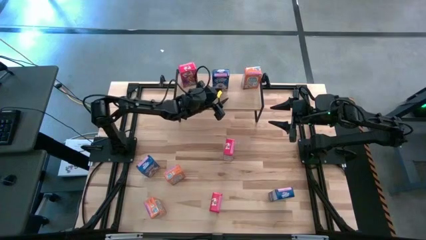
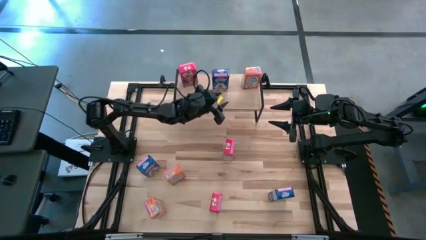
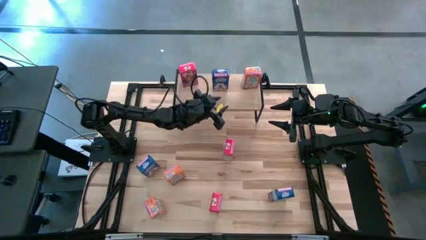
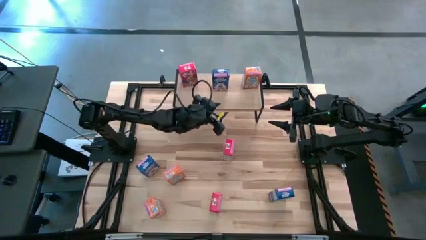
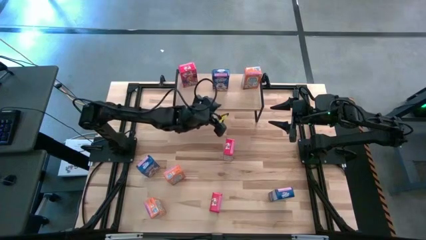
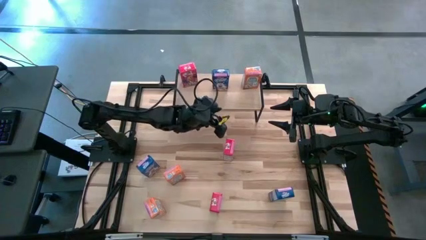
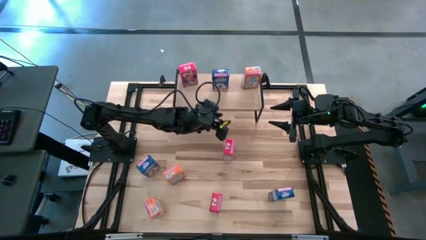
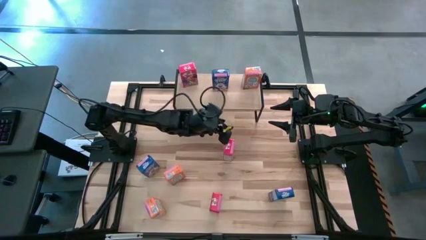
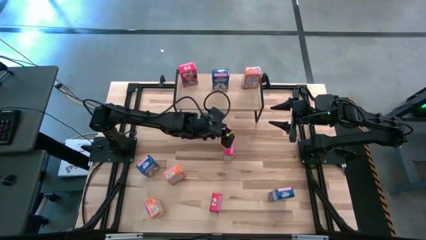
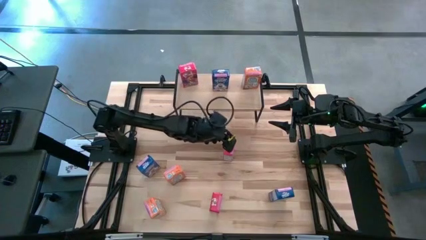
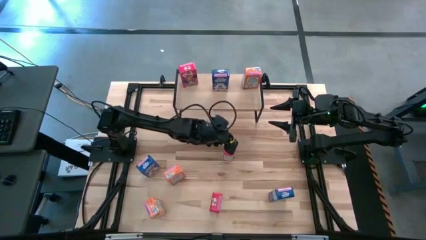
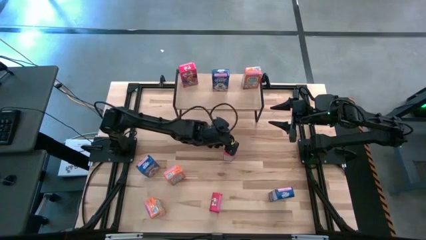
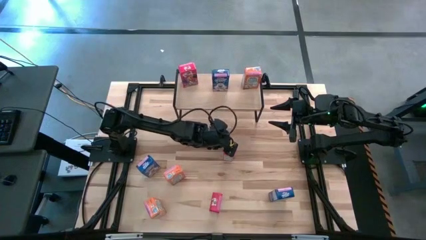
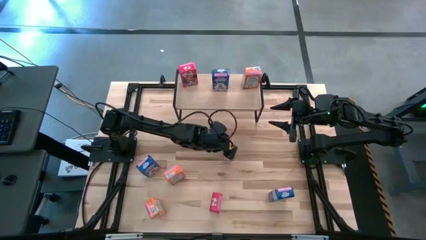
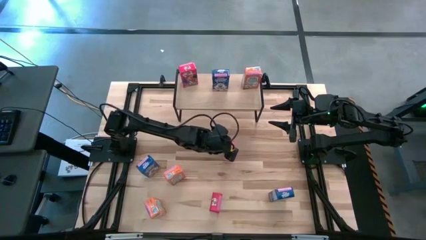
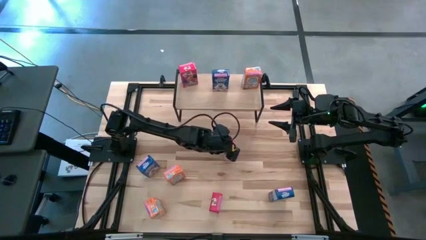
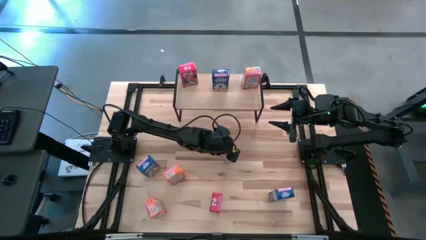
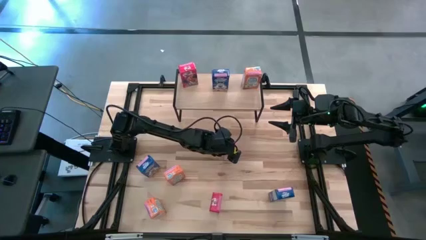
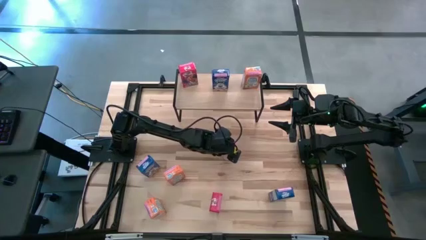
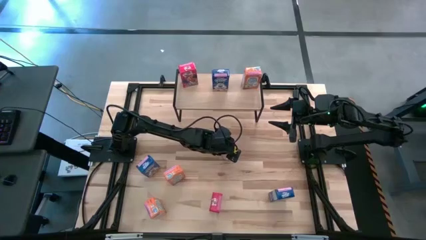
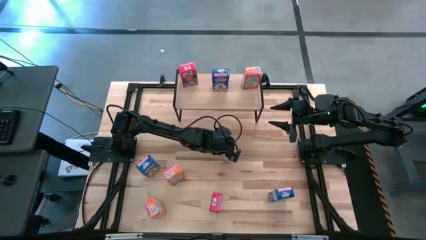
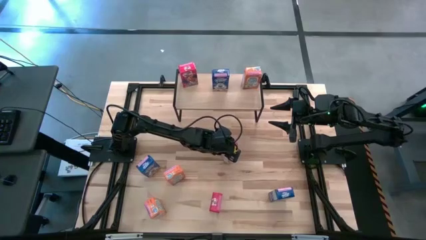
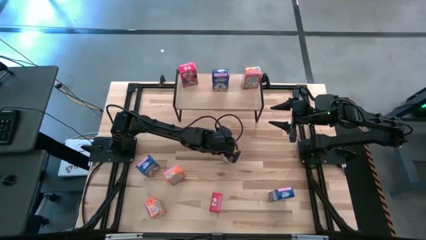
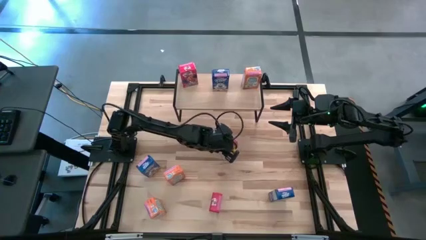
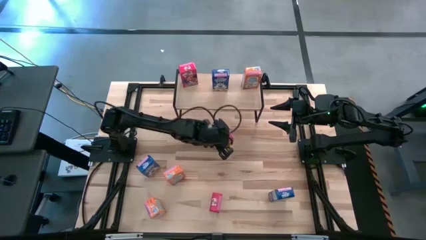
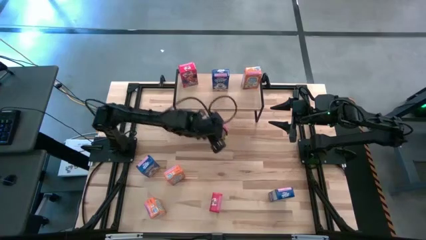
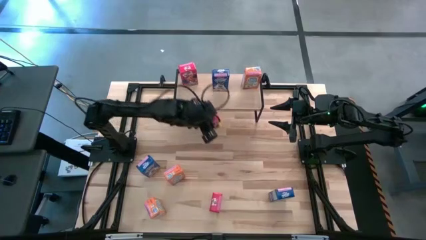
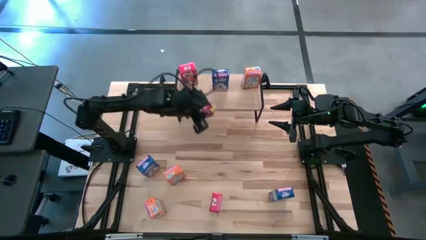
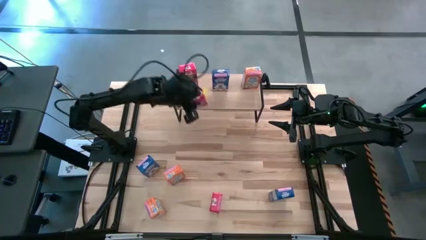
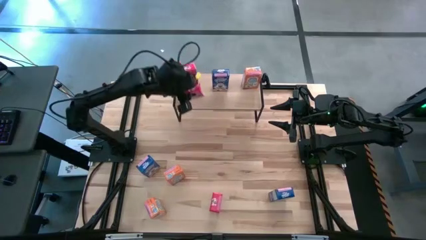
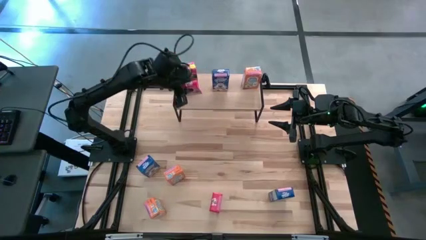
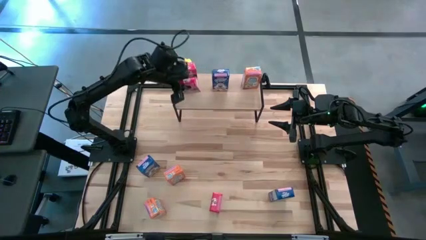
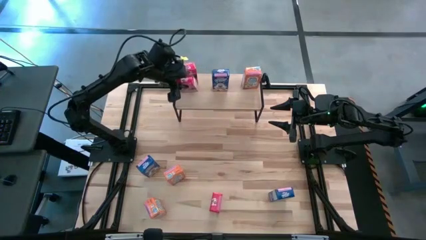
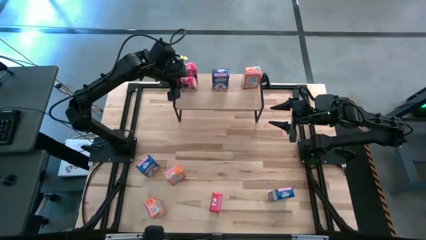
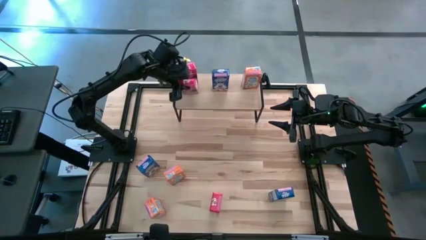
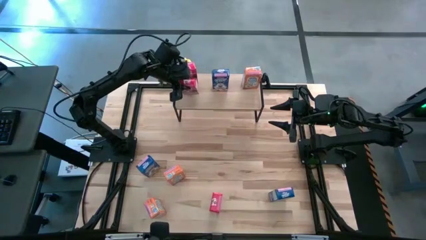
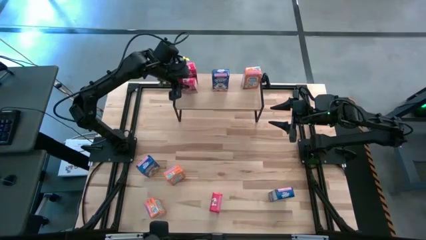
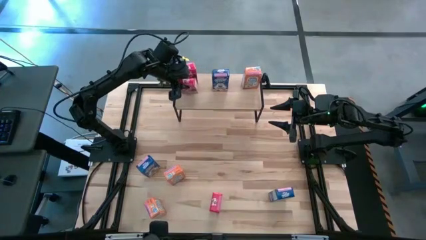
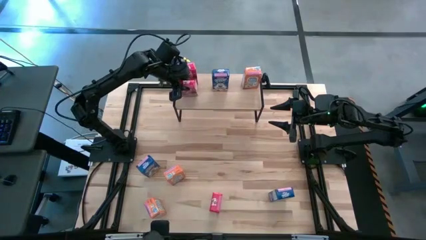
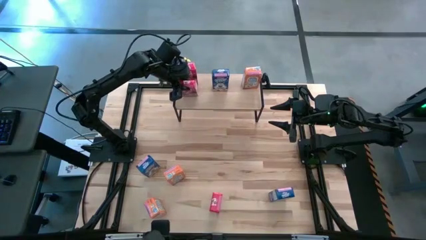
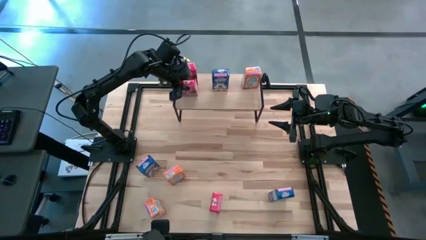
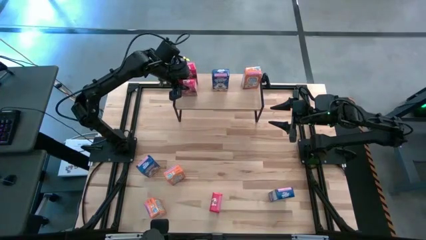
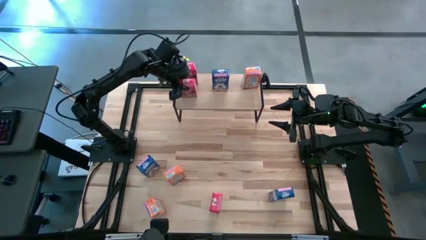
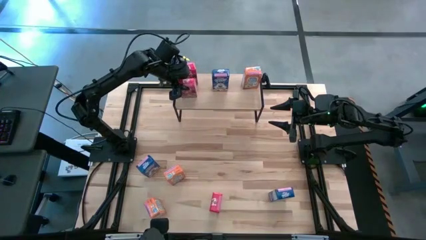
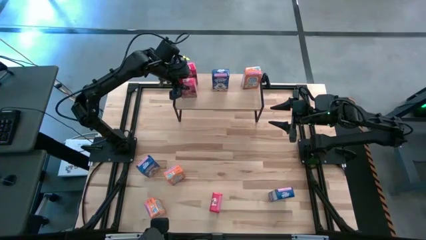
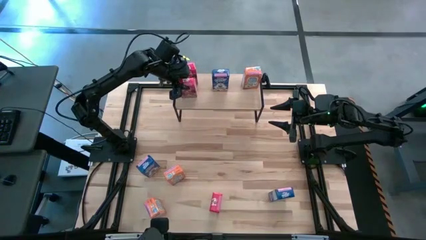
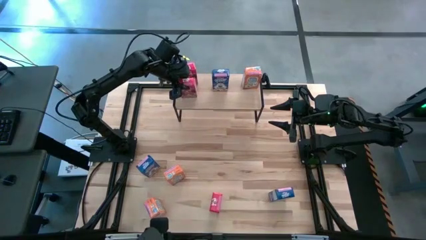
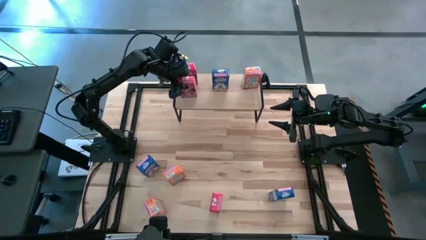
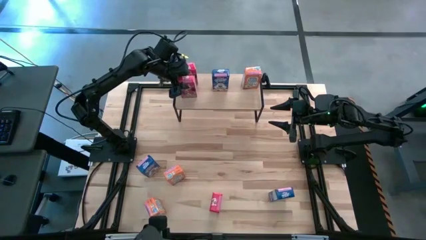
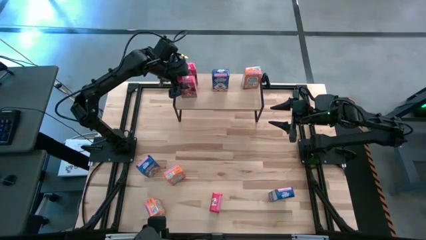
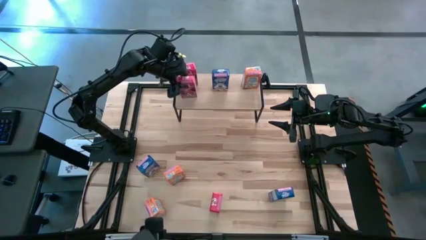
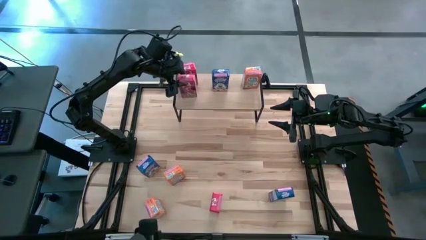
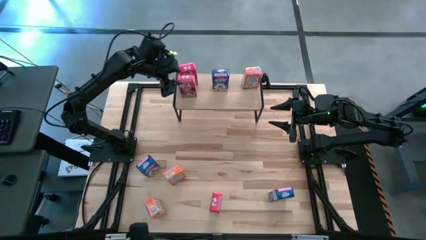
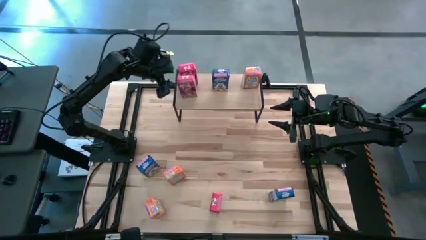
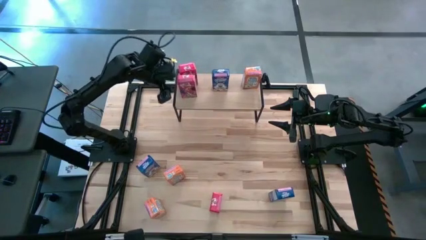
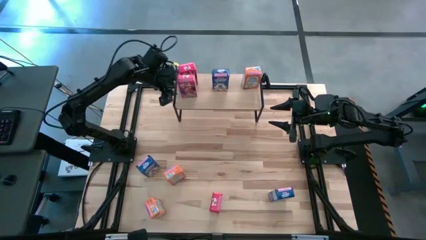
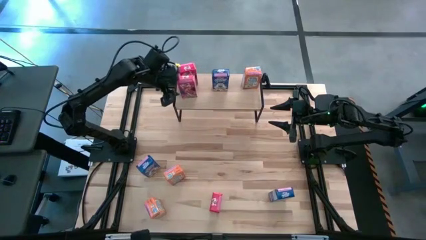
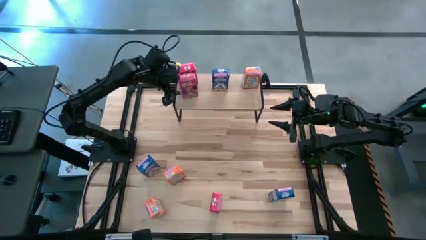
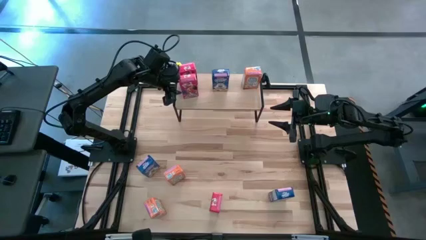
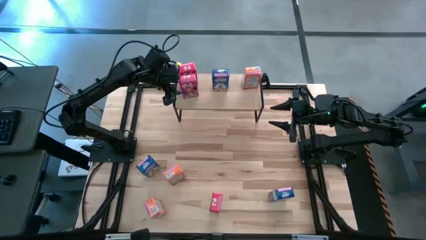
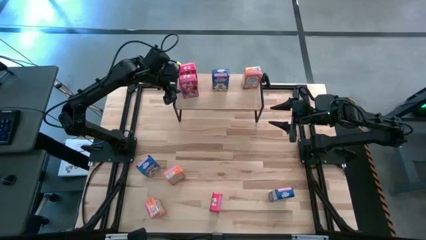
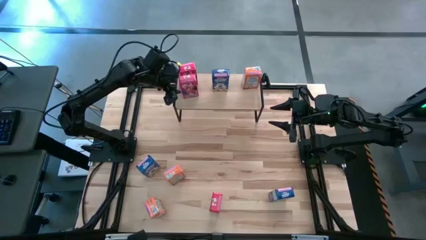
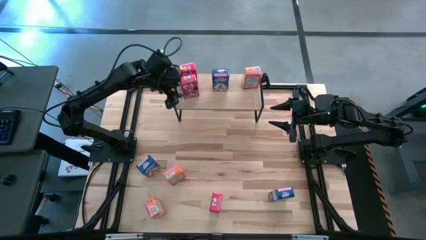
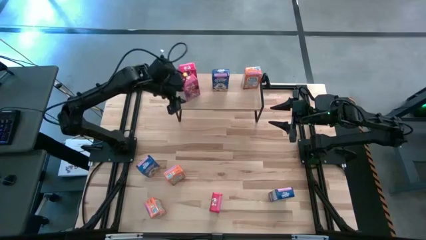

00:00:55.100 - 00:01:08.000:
Task: Stack cereal on shelf
Put the top red cereal box on the shelf aligned with the other red cereal box
